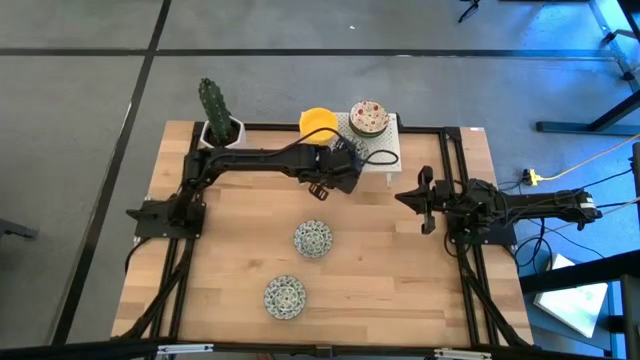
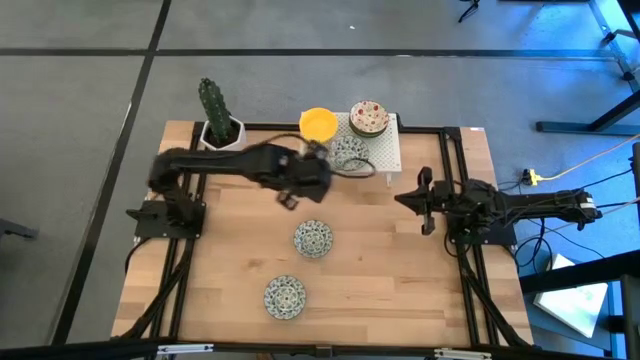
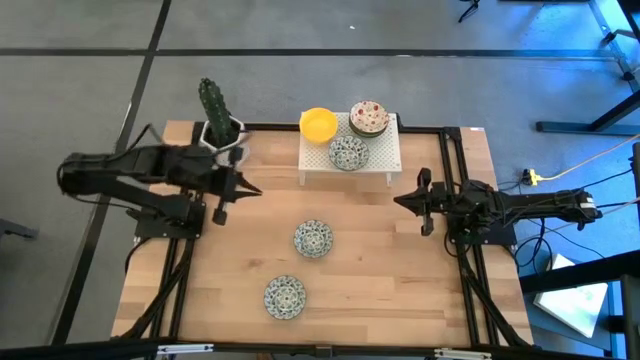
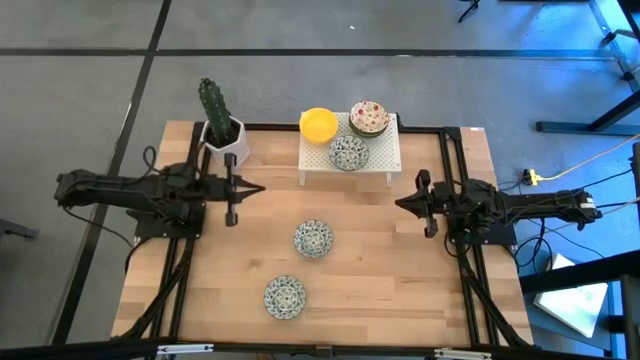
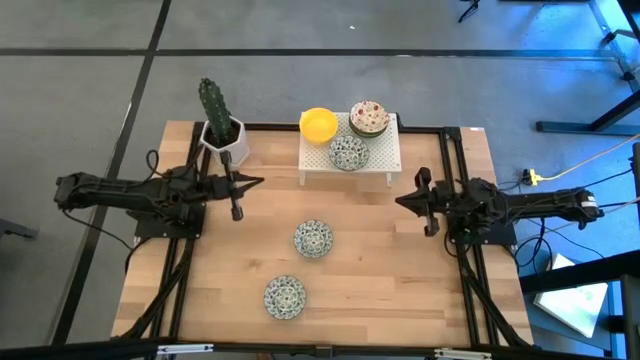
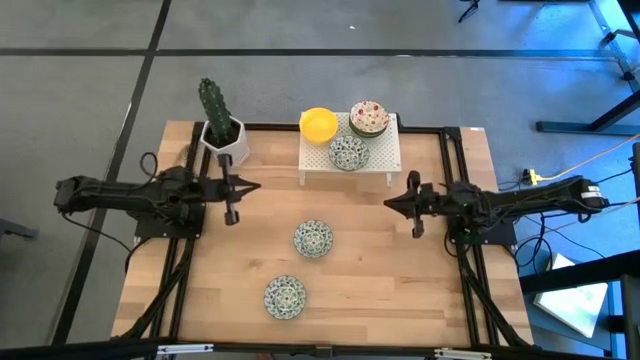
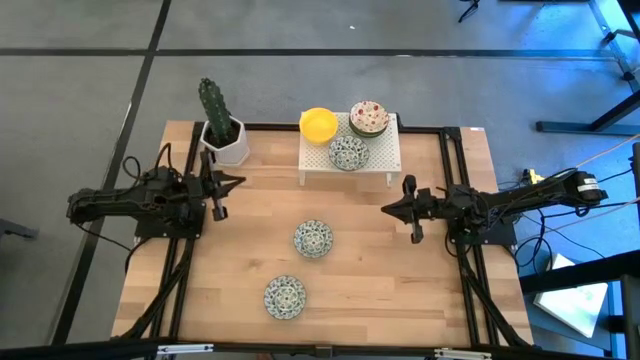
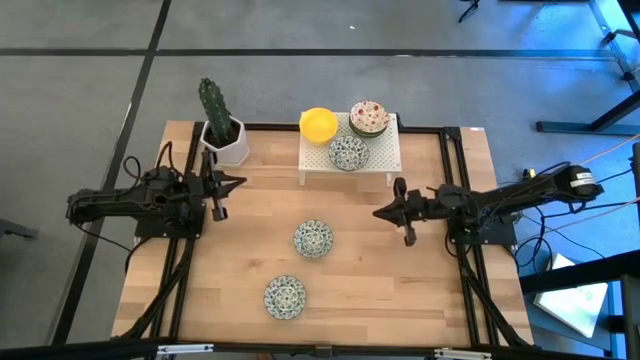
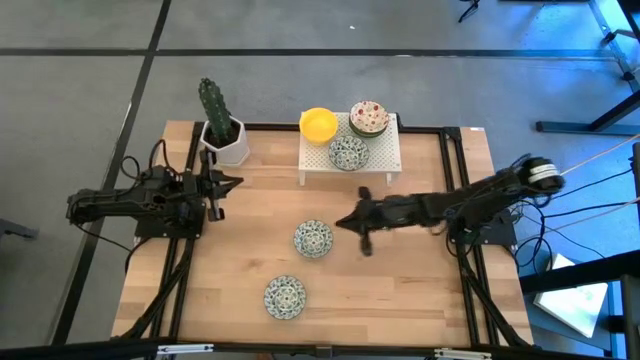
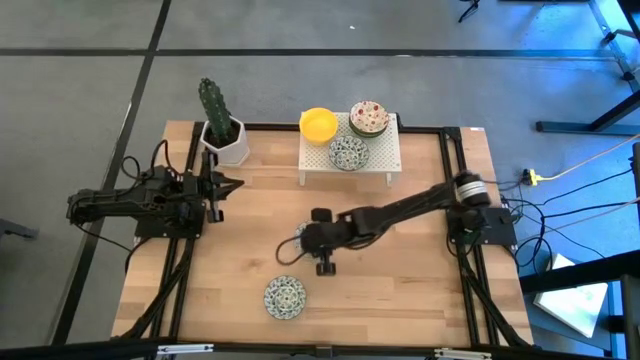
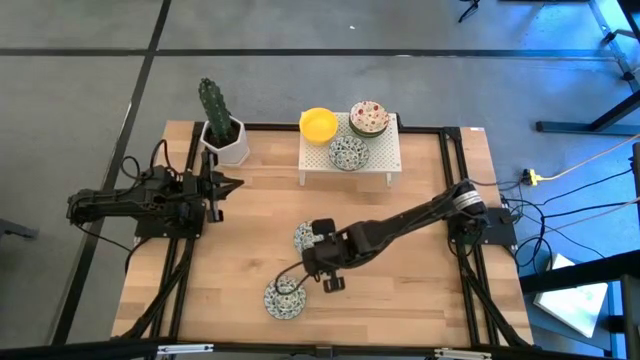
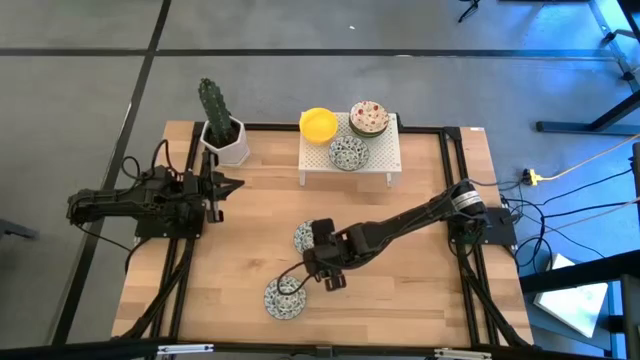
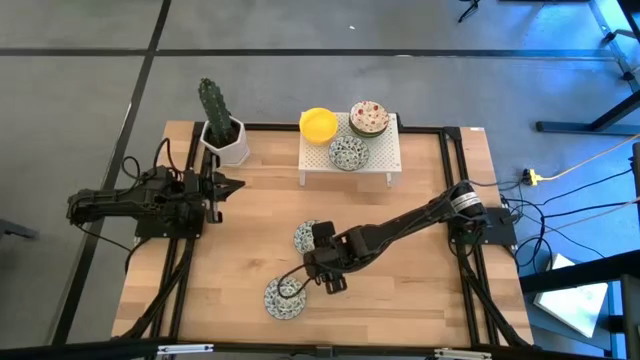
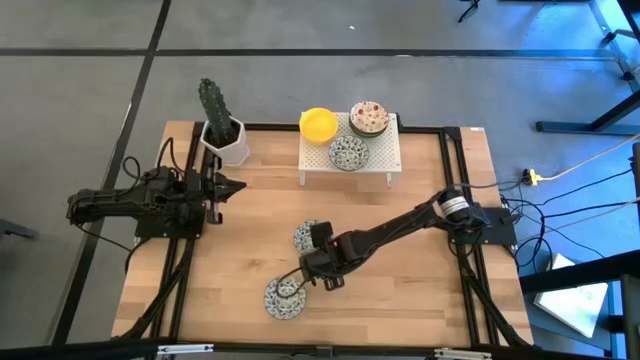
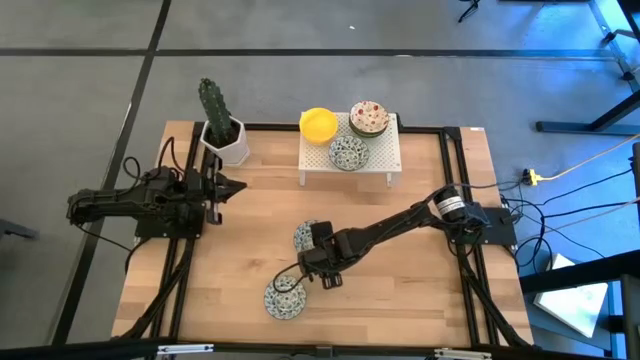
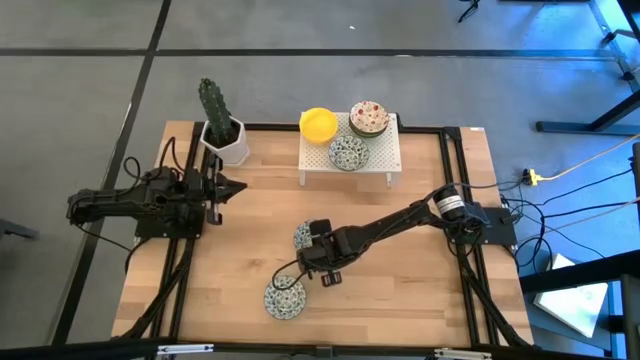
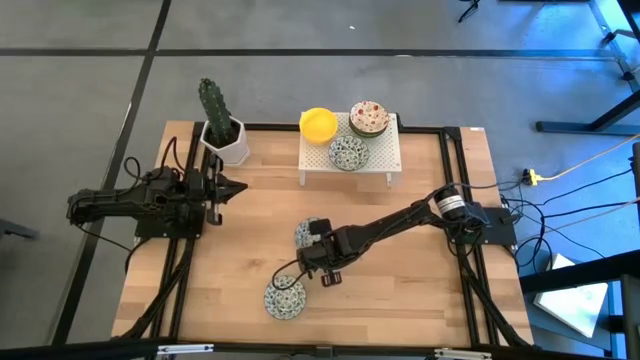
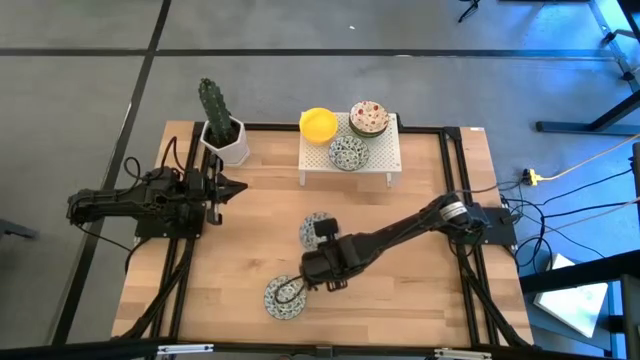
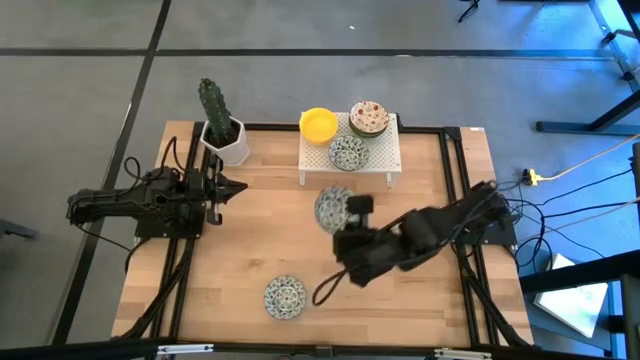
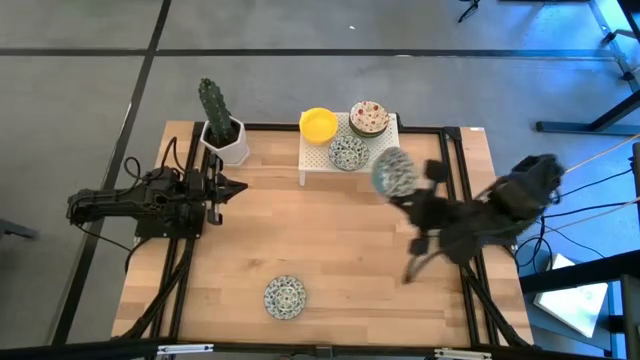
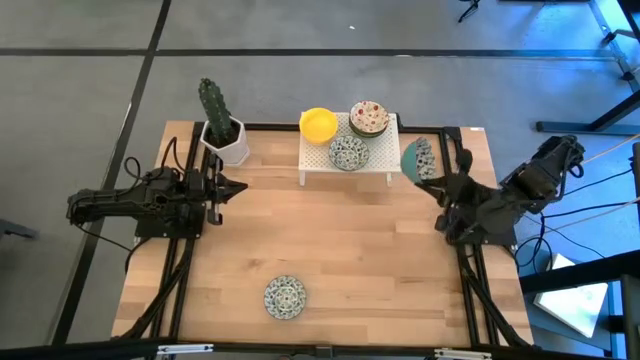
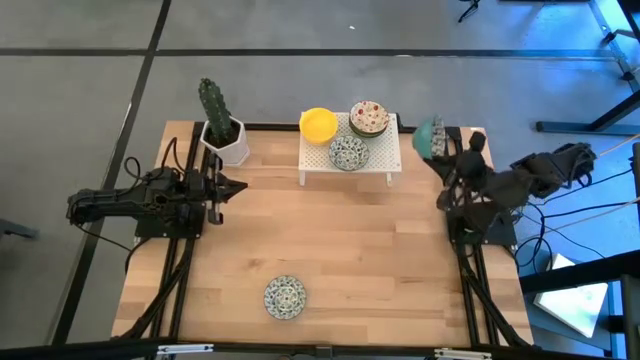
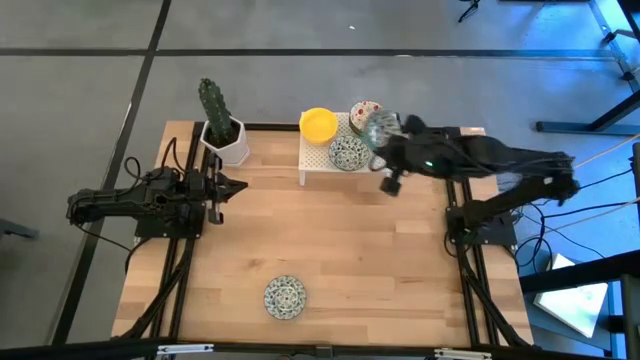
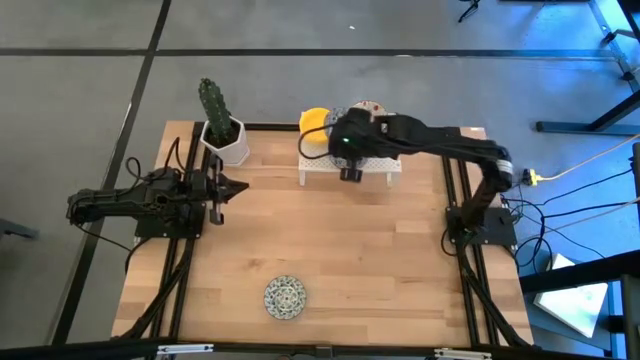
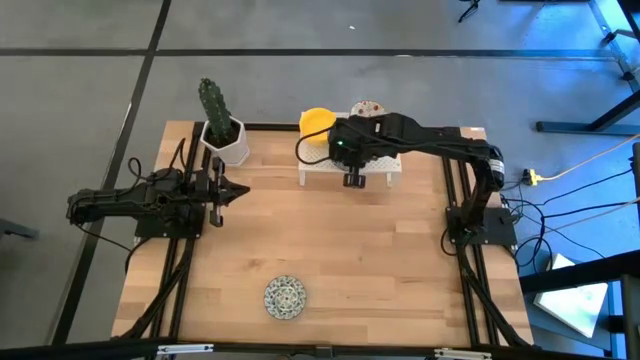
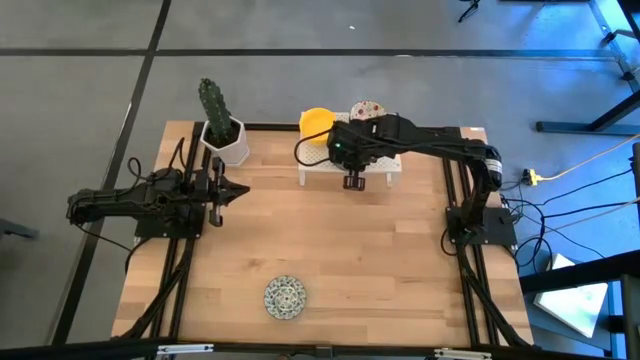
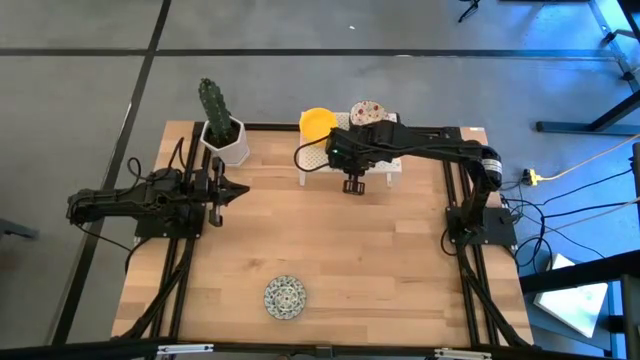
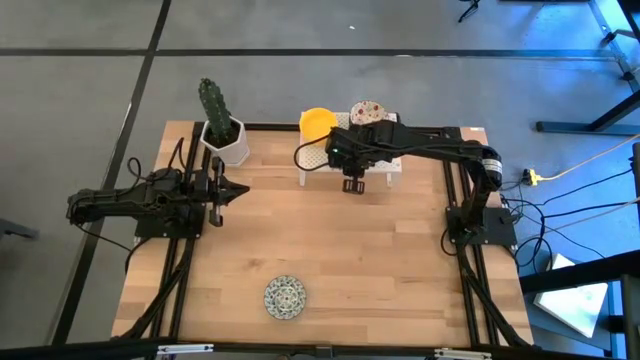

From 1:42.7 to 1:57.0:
Task: Pick & Place Mini bowls
Stack the top blue bowl on top of the blue bowl on the shelf

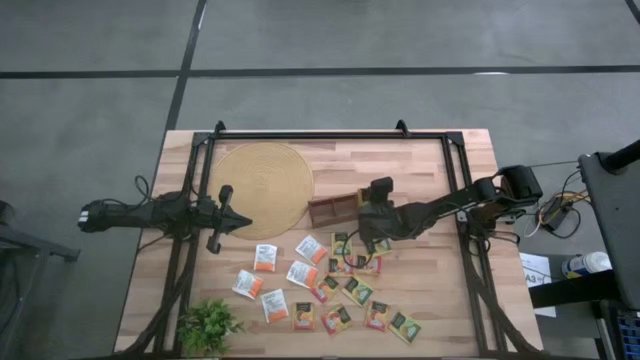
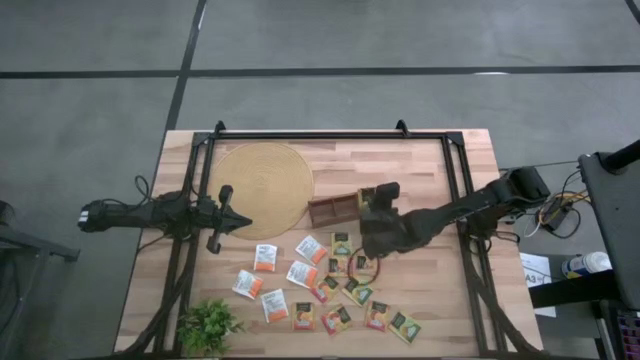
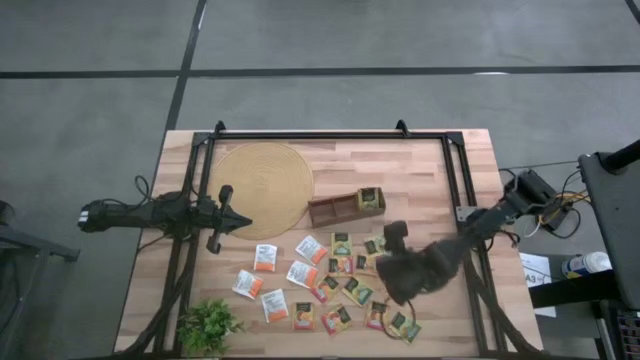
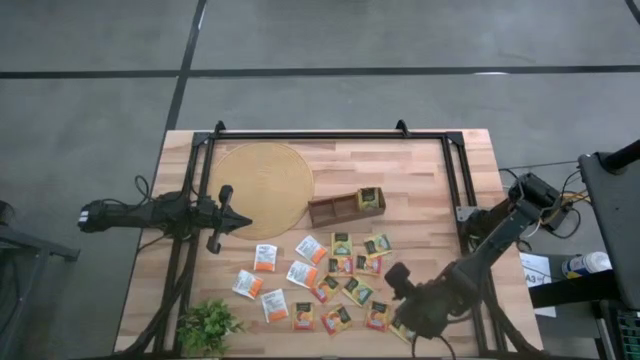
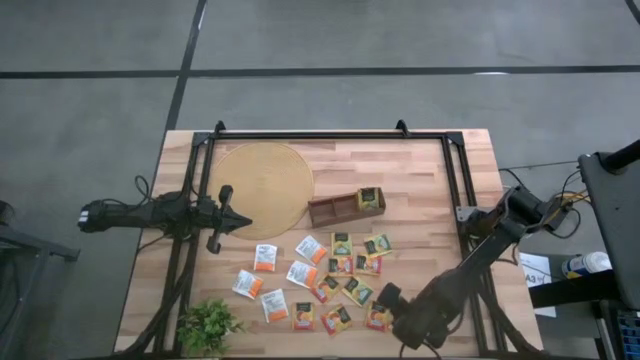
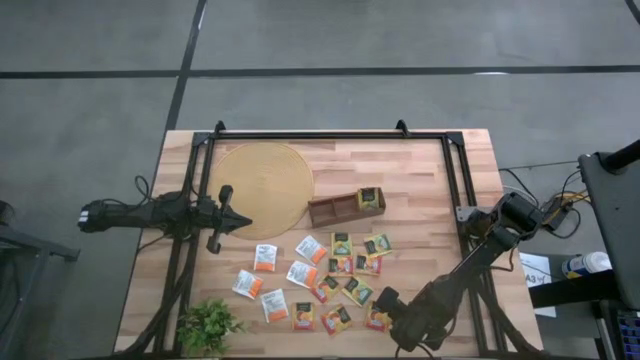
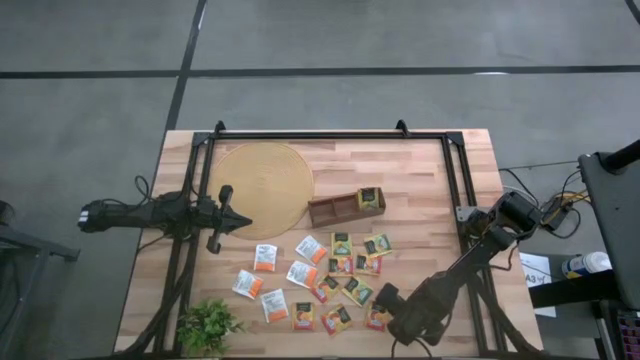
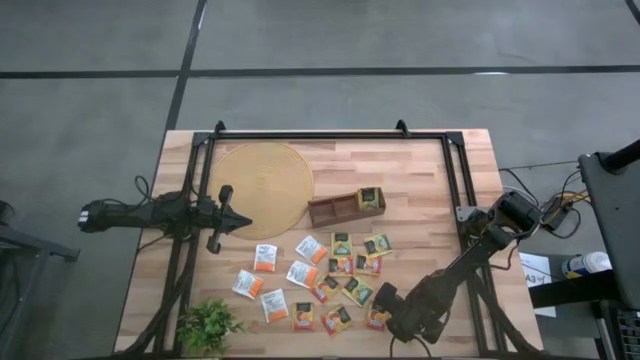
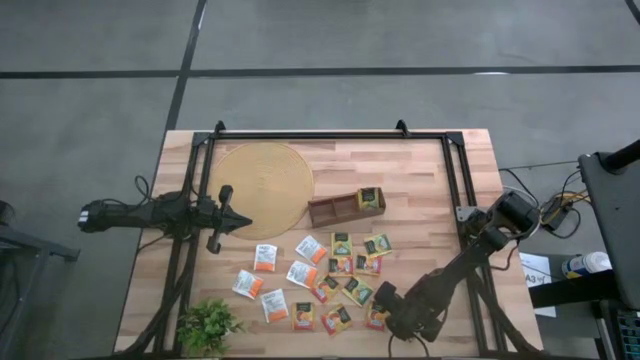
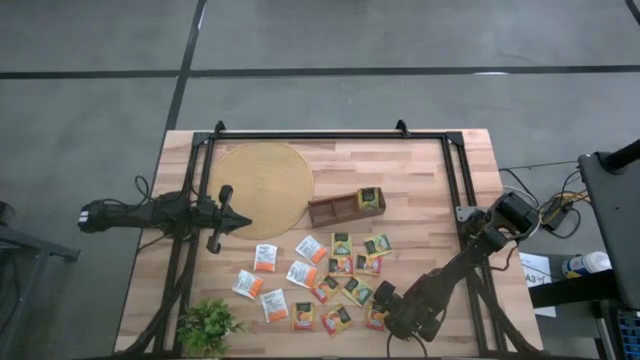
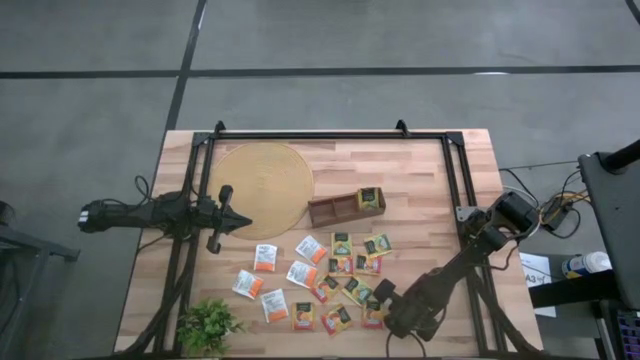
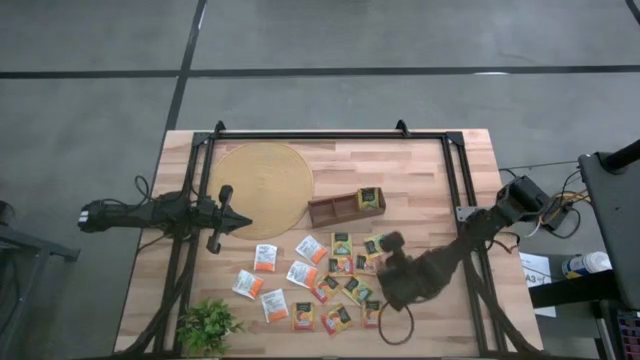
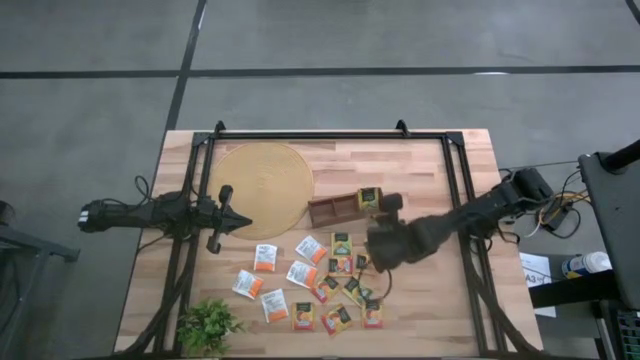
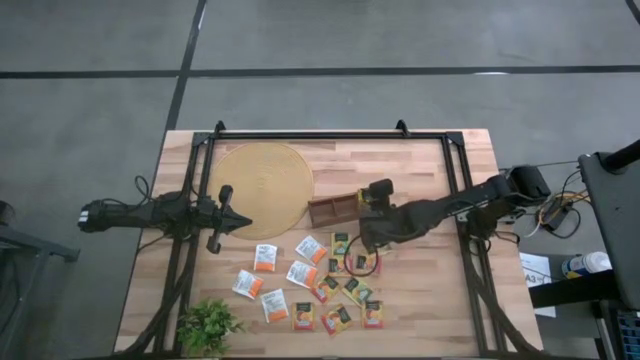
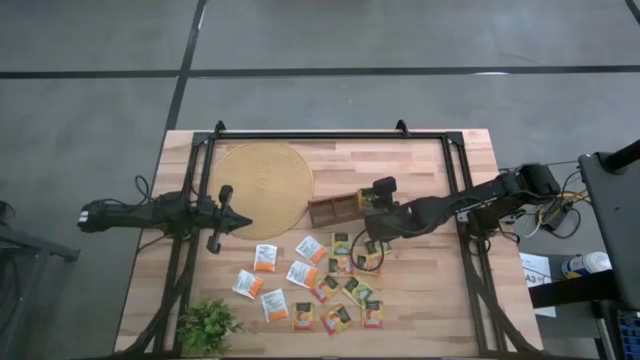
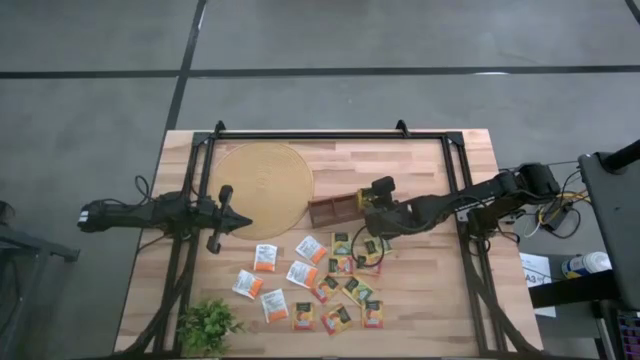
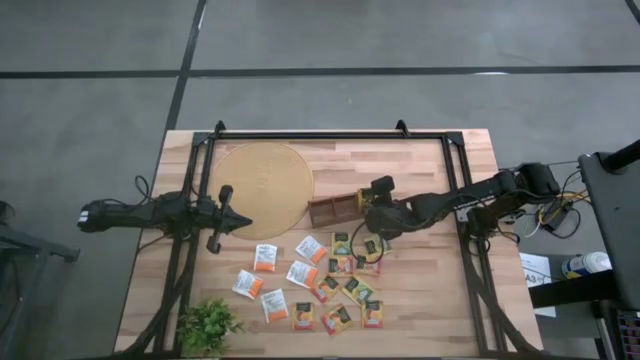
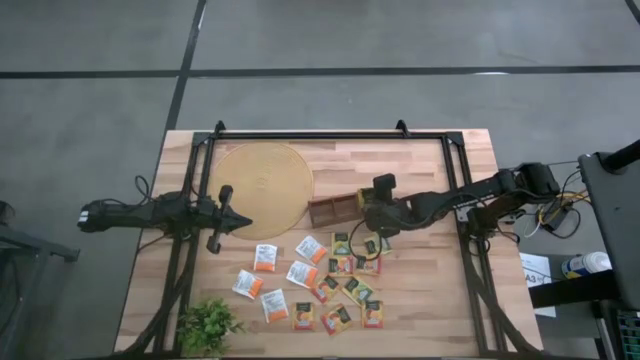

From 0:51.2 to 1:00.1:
Task: Pick & Place Tea
Put the yellow tea bag into the right section of the wooden organizer
